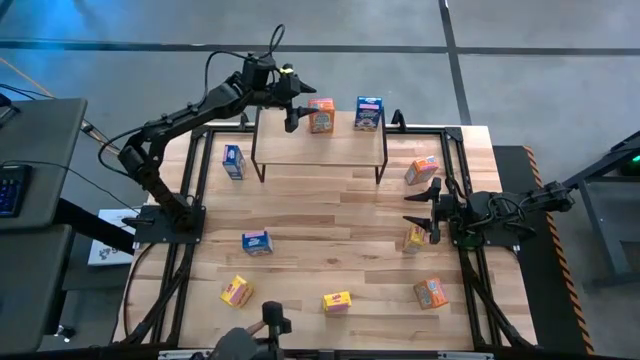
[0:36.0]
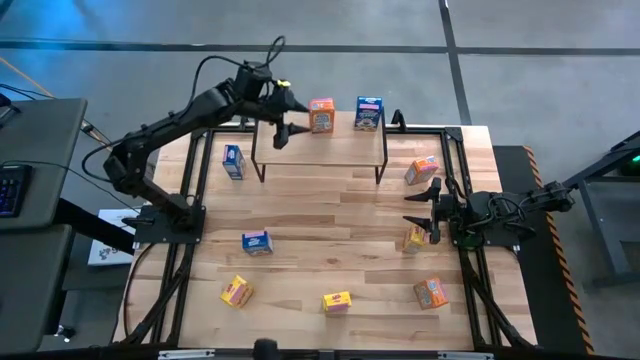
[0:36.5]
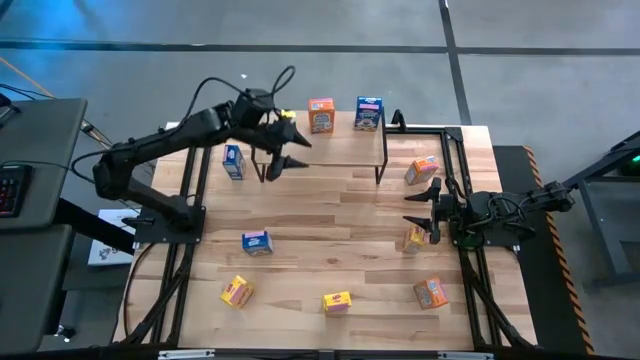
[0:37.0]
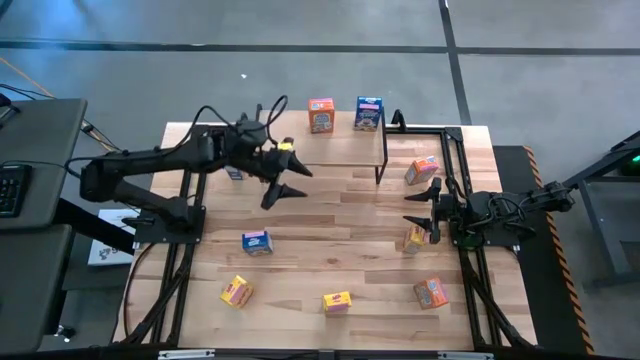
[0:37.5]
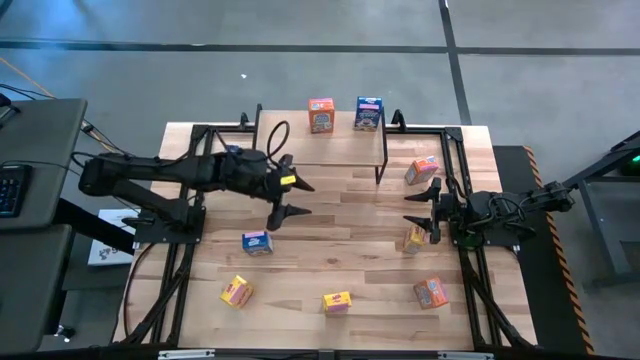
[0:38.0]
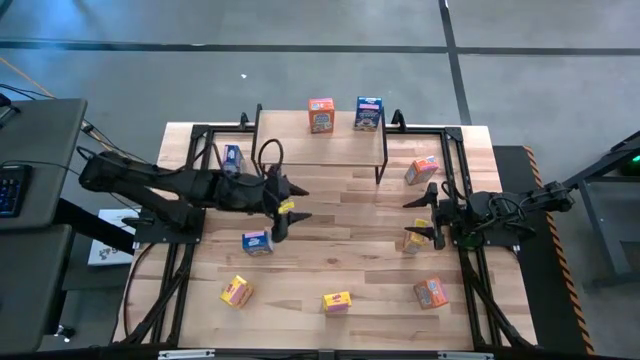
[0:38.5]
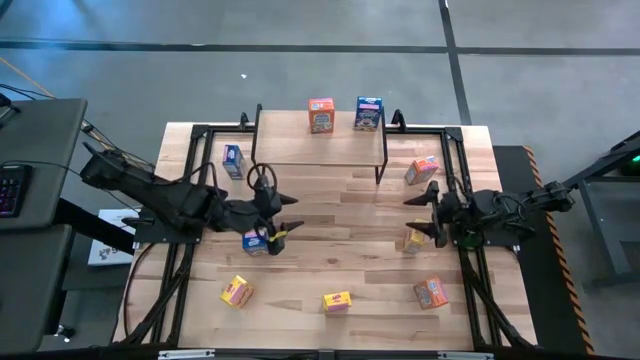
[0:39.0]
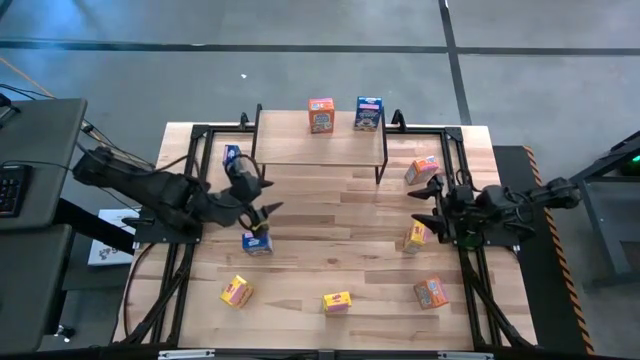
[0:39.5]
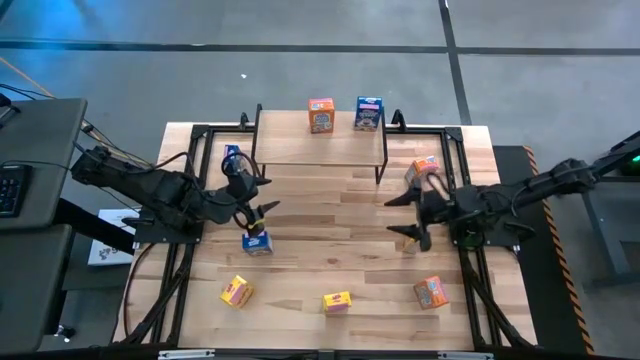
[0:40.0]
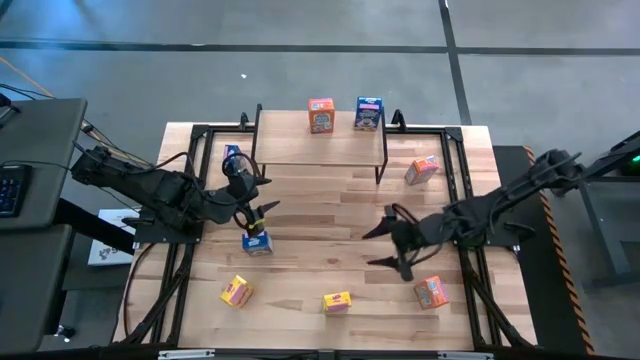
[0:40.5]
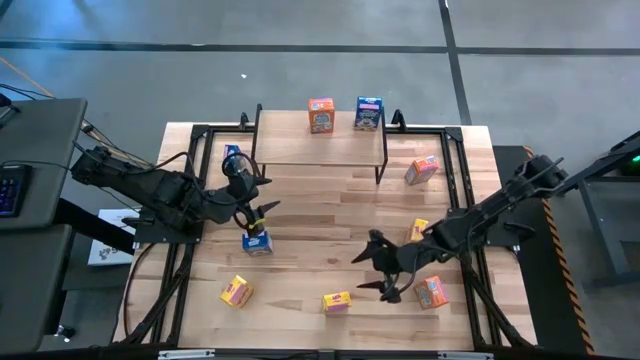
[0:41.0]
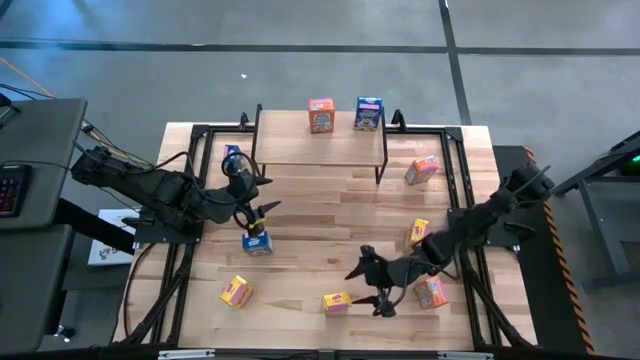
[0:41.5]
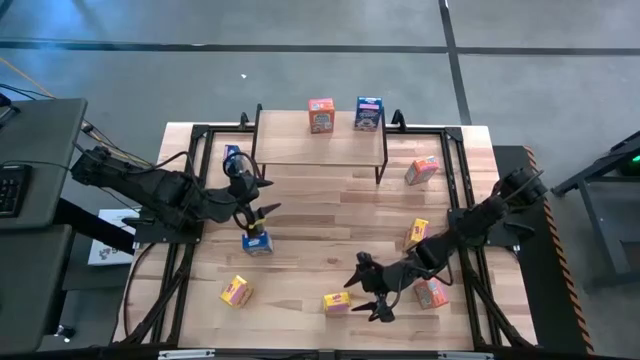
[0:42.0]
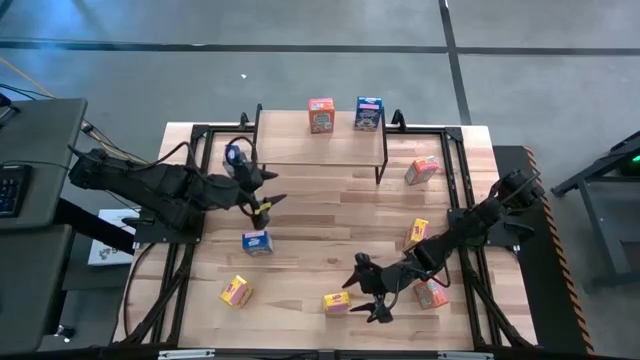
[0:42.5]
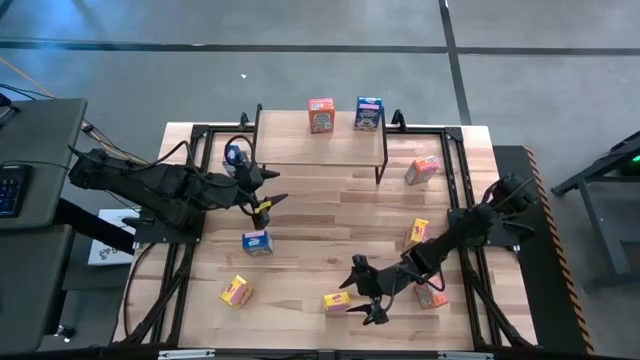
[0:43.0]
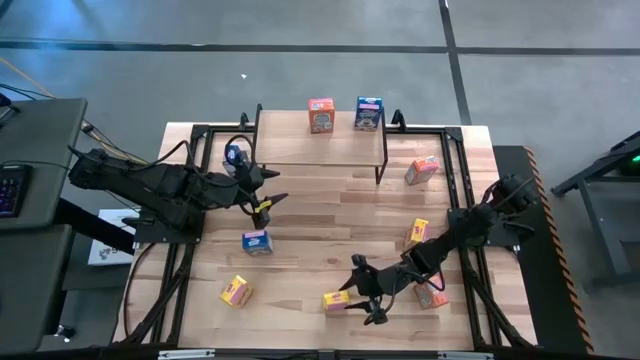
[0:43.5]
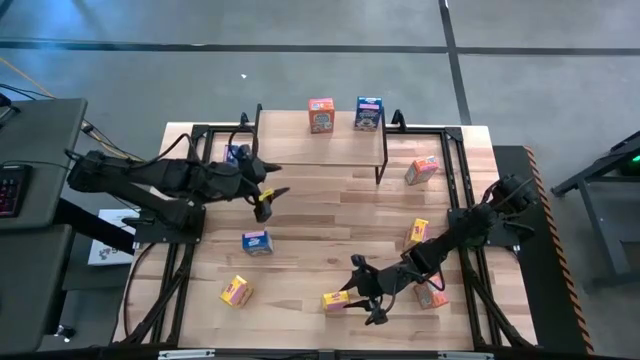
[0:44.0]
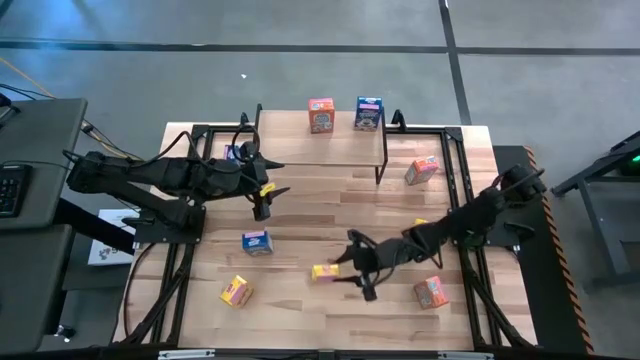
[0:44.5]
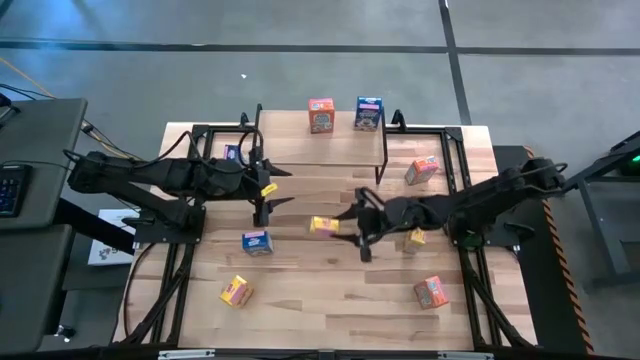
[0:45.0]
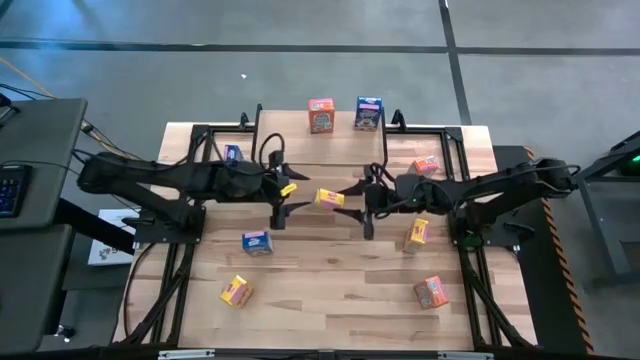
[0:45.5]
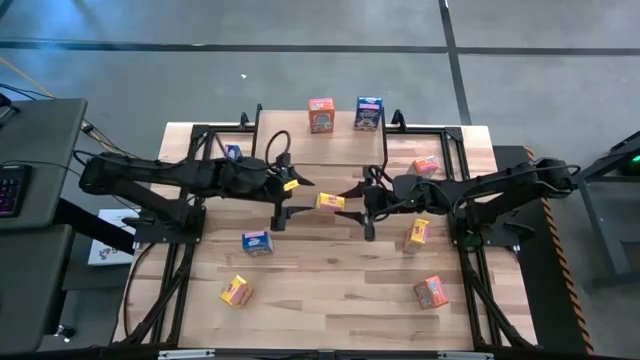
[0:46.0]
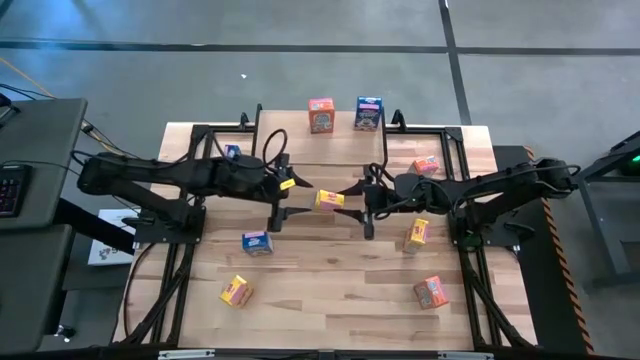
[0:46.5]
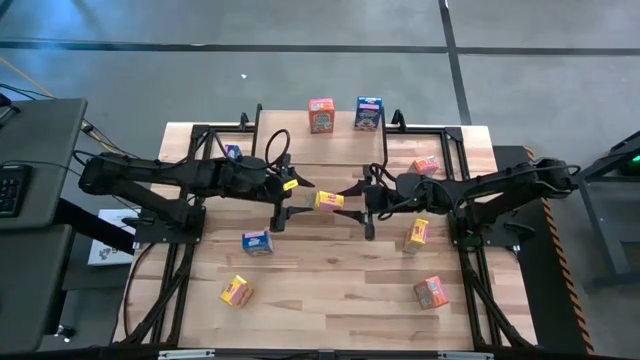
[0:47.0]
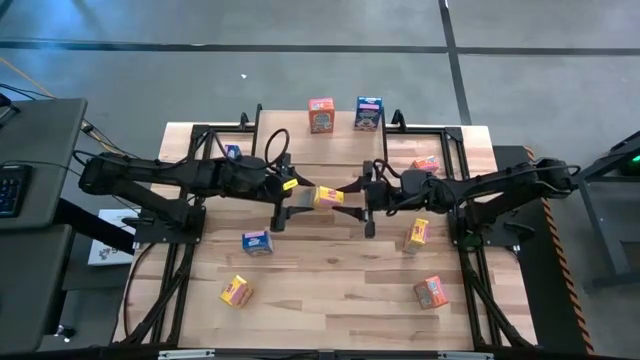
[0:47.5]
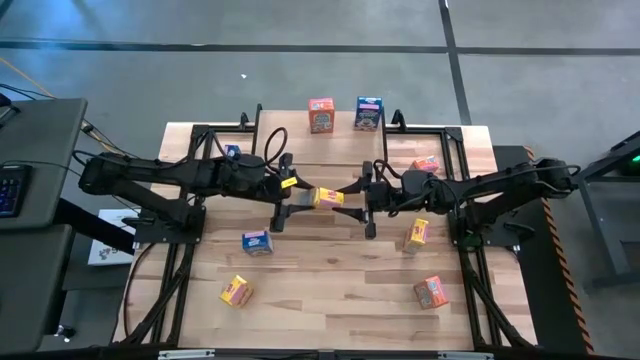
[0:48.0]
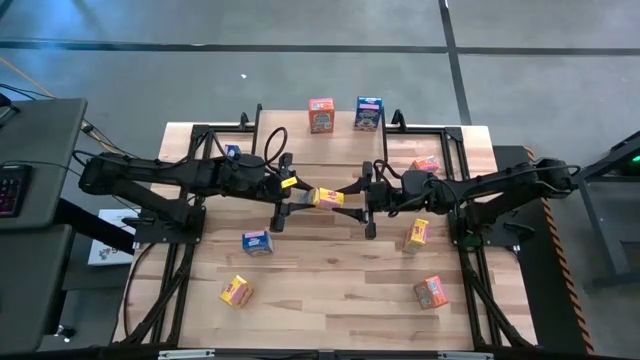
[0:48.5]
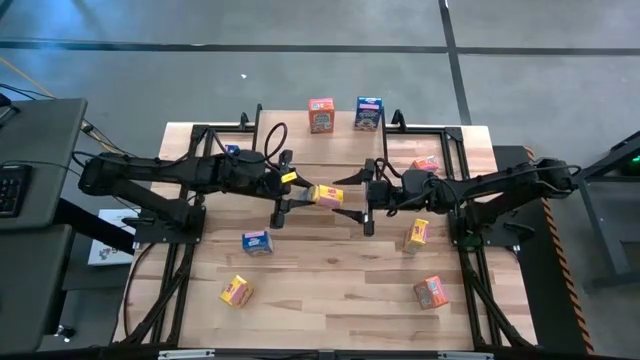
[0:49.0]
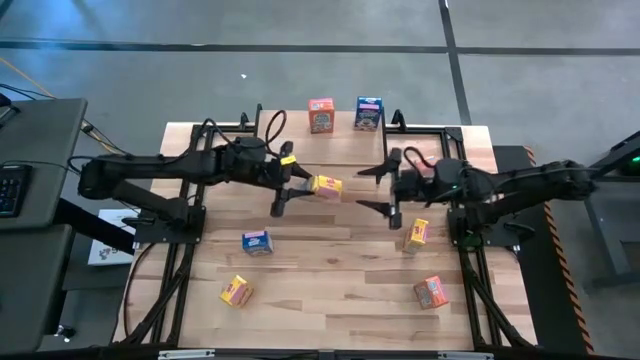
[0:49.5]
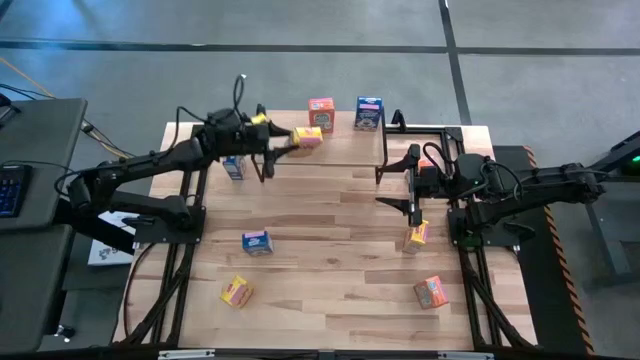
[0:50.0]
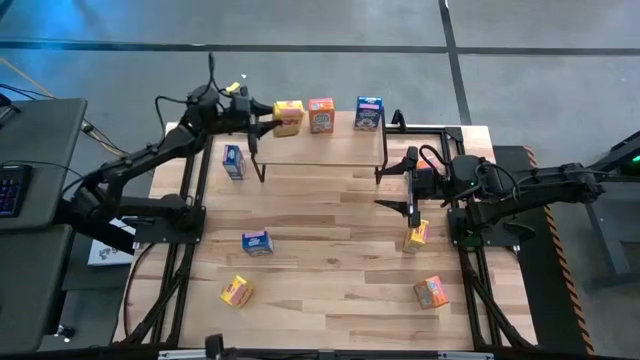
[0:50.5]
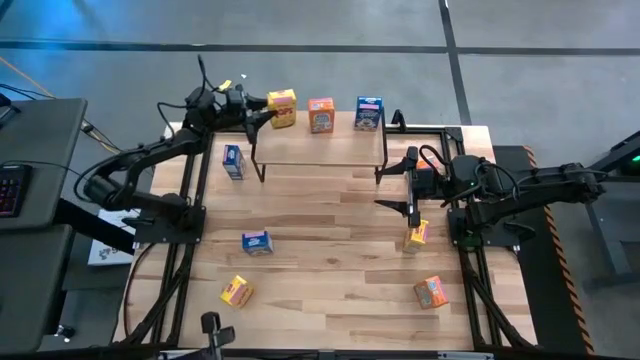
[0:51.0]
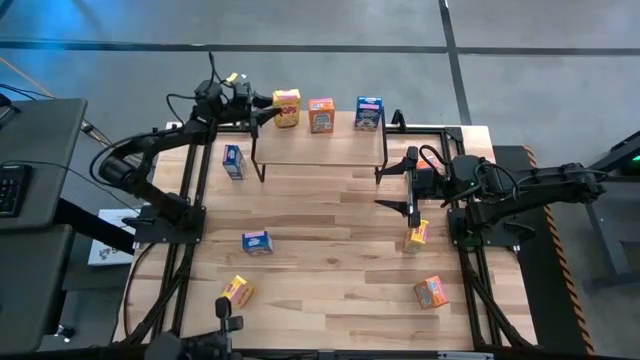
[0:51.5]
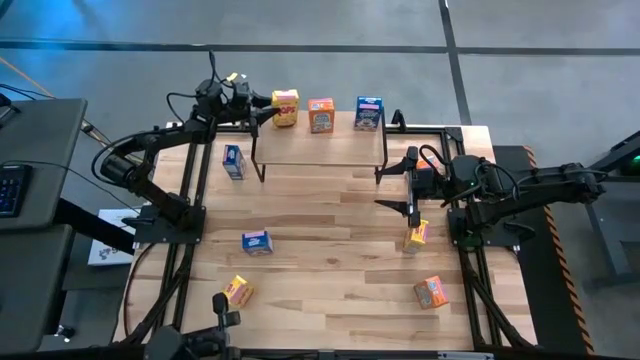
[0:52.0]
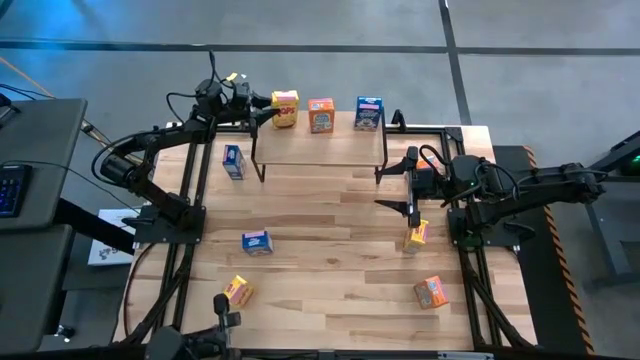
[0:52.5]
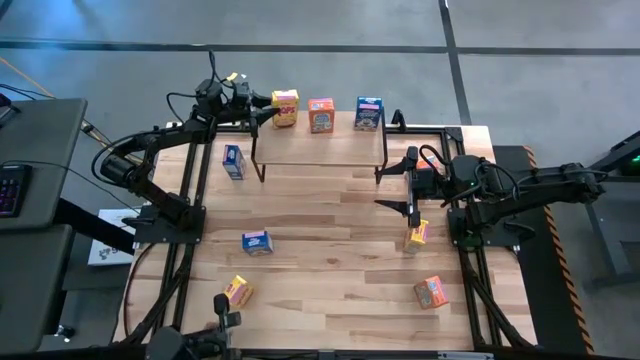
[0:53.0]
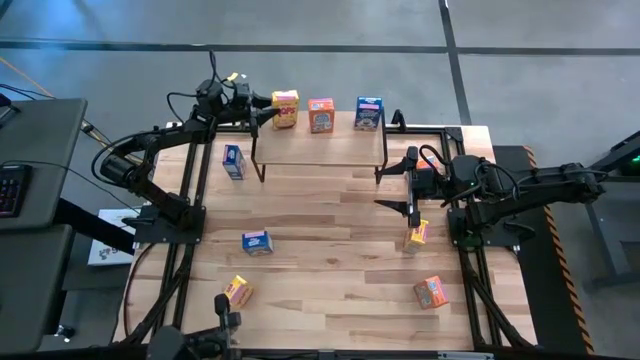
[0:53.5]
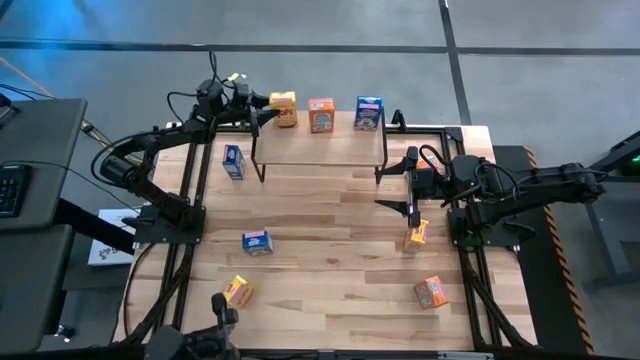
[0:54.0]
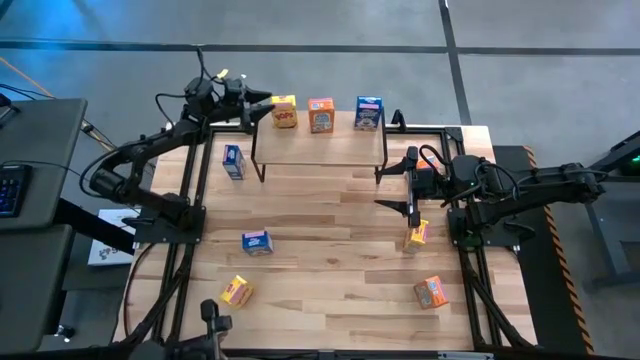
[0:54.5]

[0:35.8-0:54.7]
Task: Stack cereal on shelf
Put the middle yellow cereal box on the shelf
